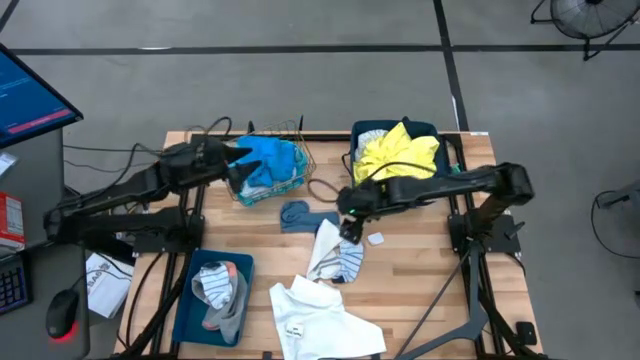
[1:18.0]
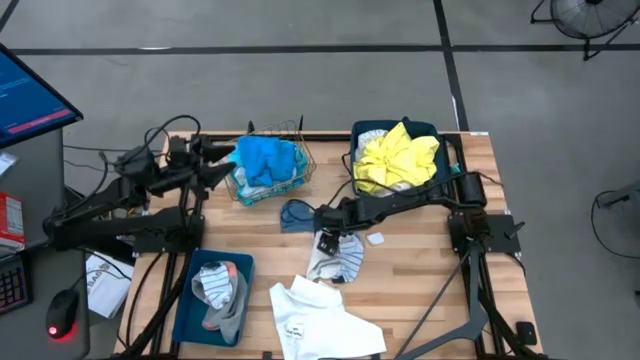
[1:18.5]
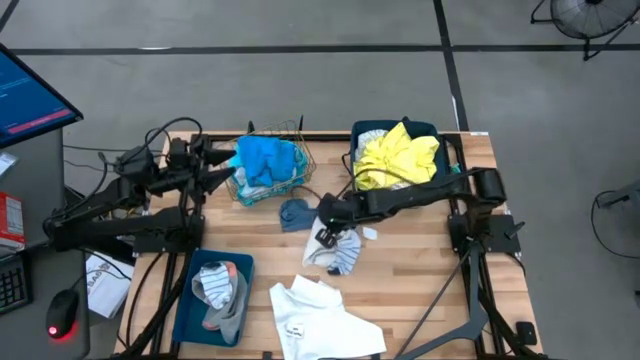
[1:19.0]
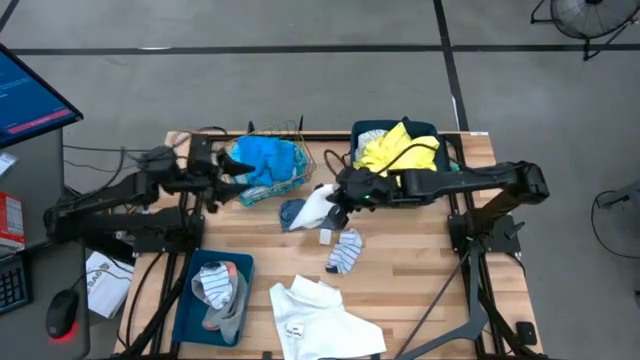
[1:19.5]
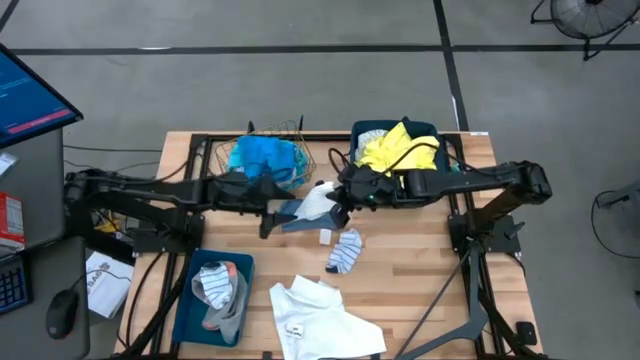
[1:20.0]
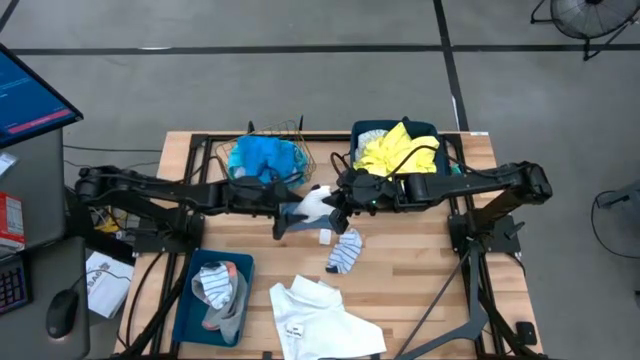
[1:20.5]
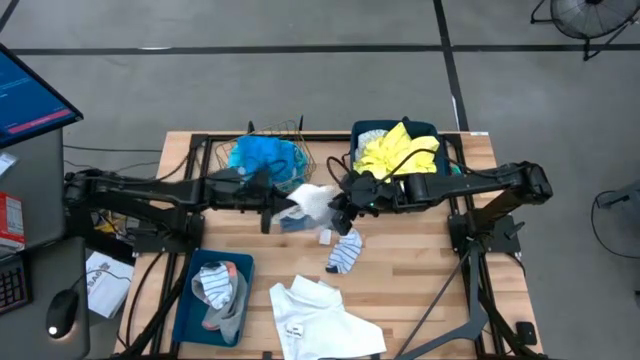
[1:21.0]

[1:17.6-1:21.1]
Task: Pick & Place Cloths
Put the white sock into the blue bin

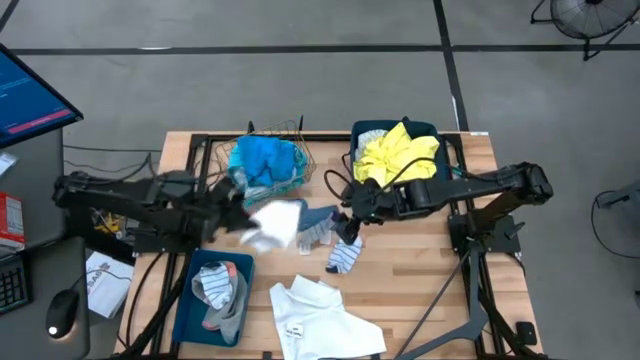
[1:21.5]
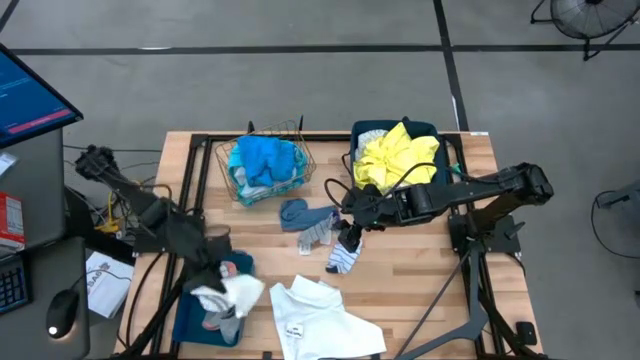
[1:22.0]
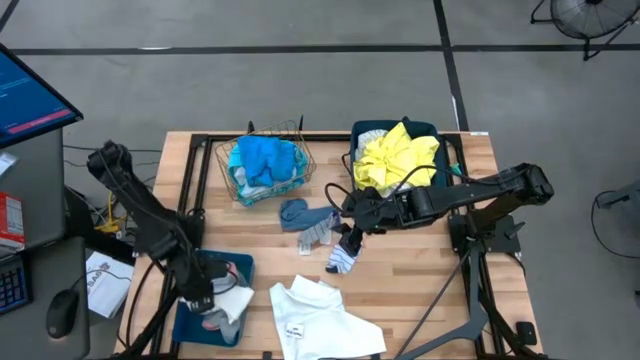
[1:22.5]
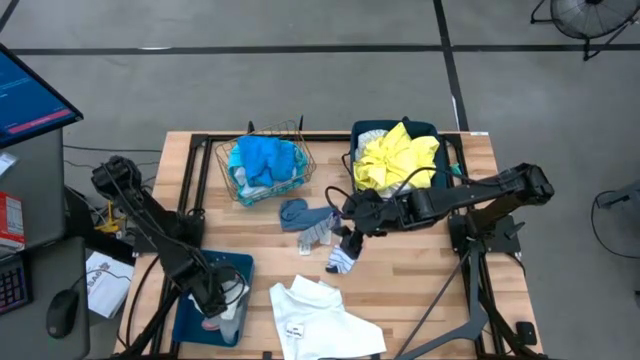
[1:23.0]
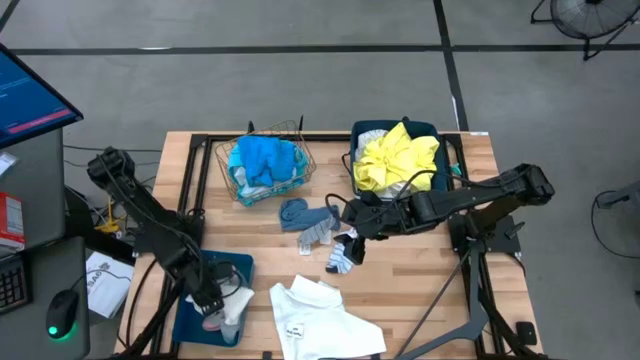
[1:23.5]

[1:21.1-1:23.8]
Put the white sock into the blue bin

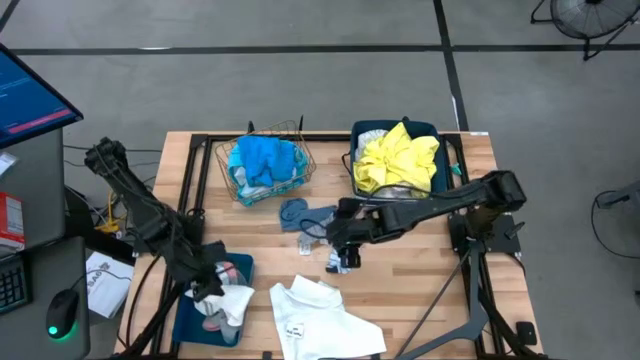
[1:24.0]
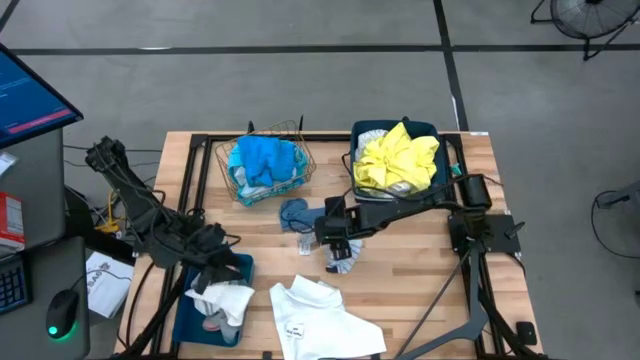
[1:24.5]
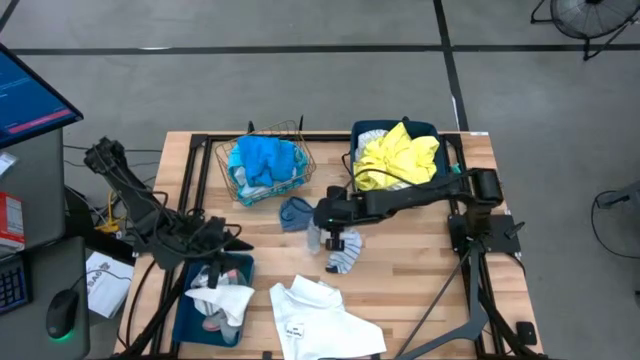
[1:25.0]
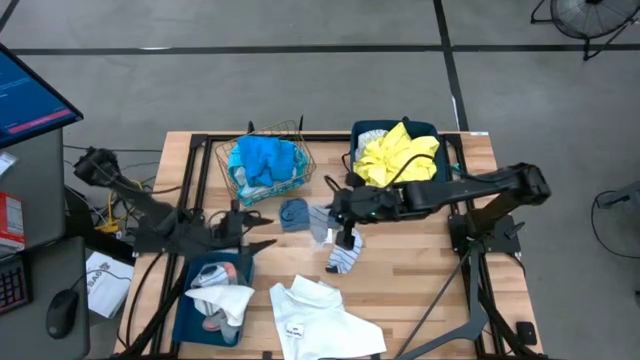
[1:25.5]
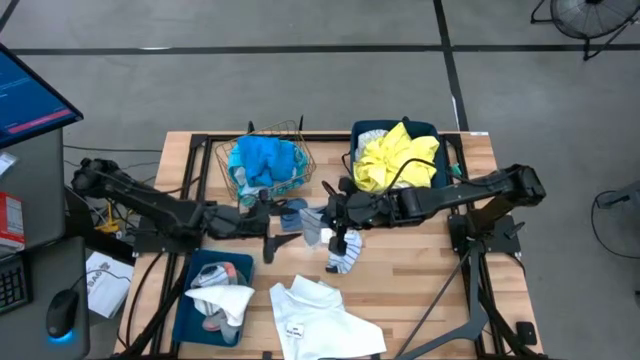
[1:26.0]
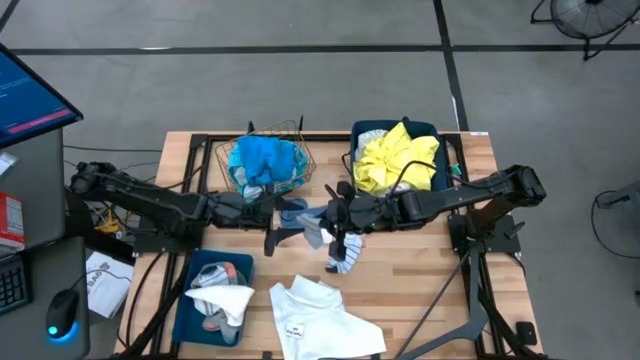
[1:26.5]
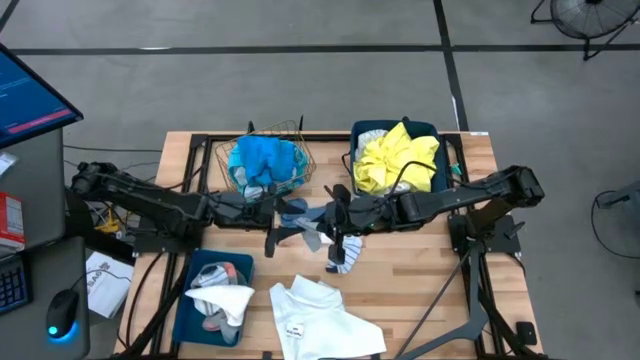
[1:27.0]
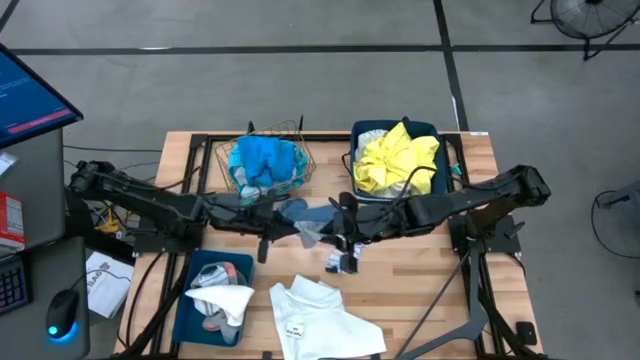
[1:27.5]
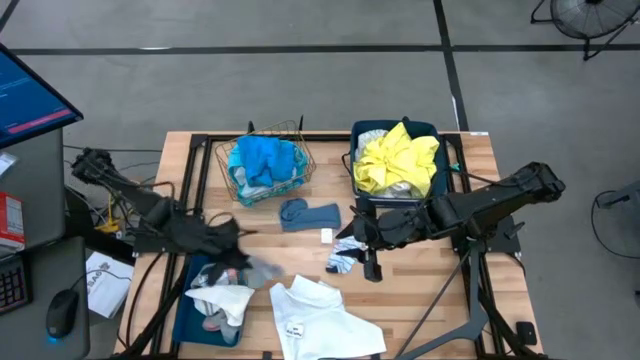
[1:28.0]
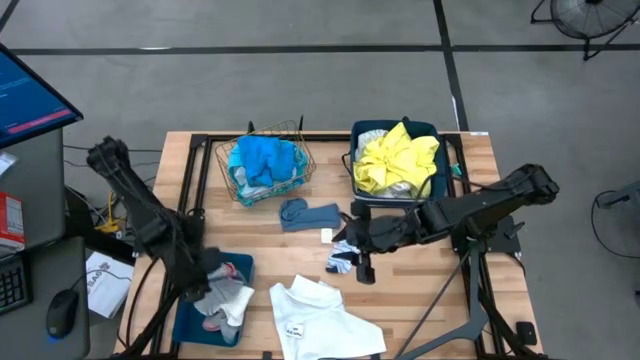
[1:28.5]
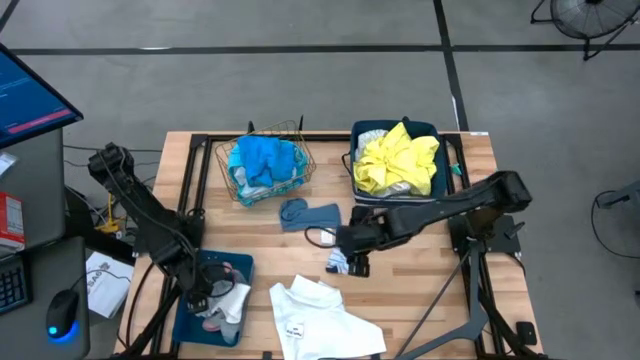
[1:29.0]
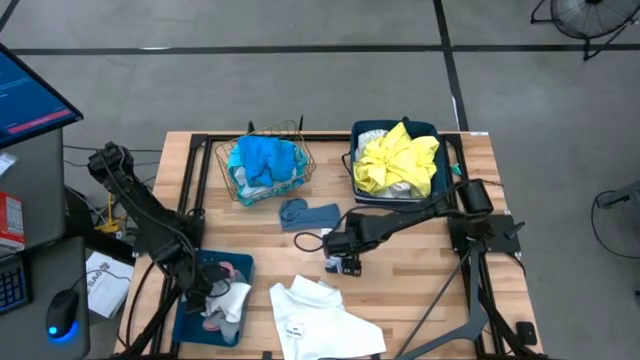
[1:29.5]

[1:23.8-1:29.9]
Put the gray striped sock into the blue bin

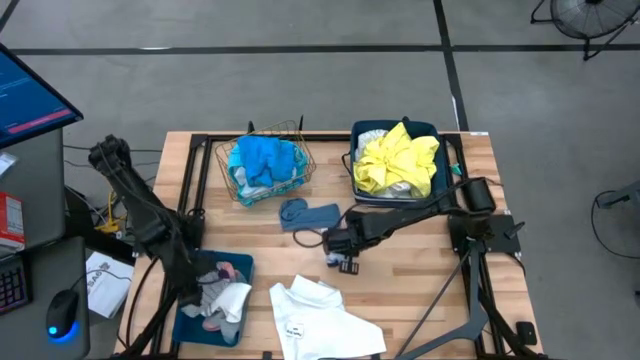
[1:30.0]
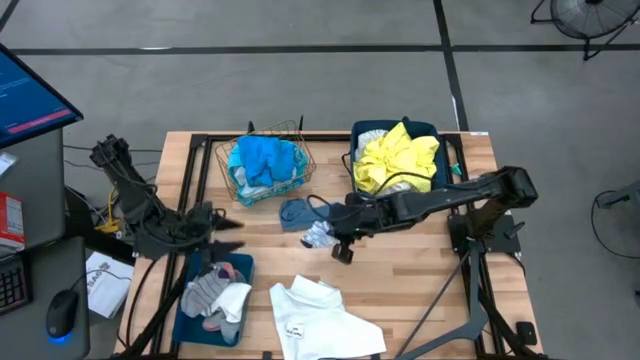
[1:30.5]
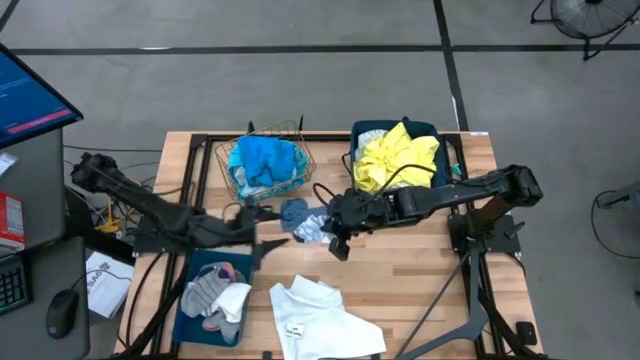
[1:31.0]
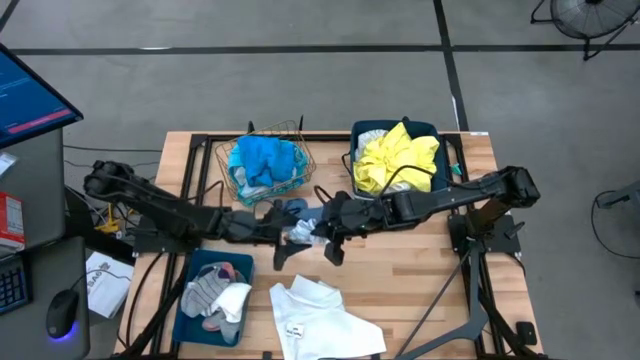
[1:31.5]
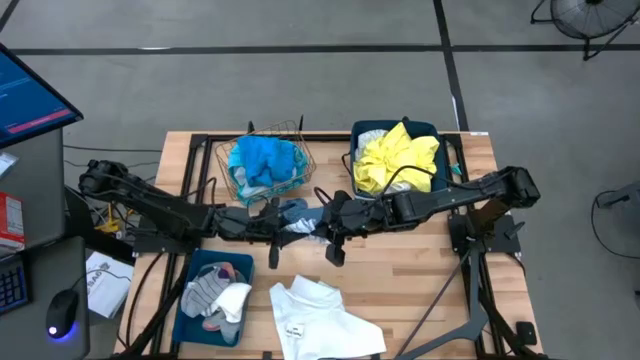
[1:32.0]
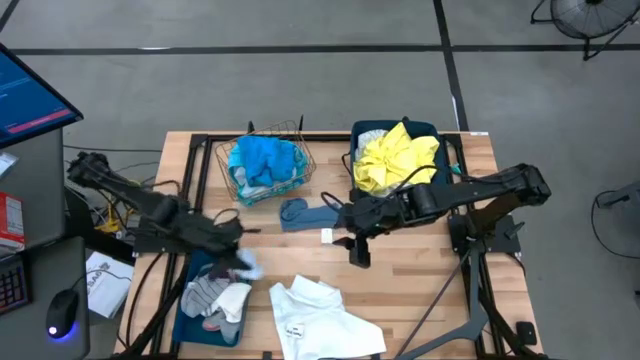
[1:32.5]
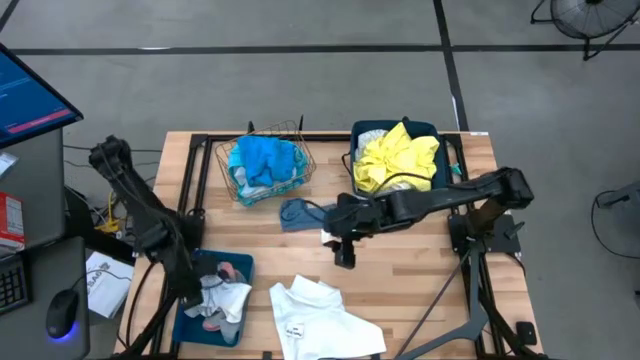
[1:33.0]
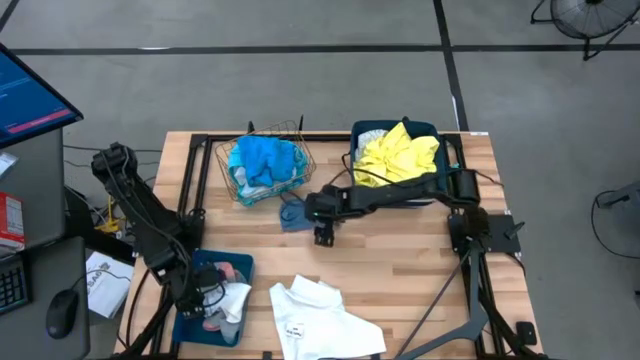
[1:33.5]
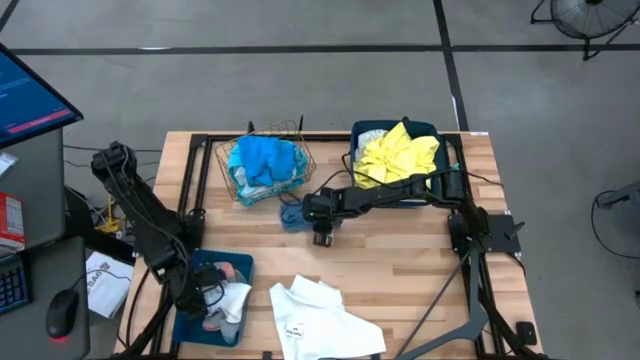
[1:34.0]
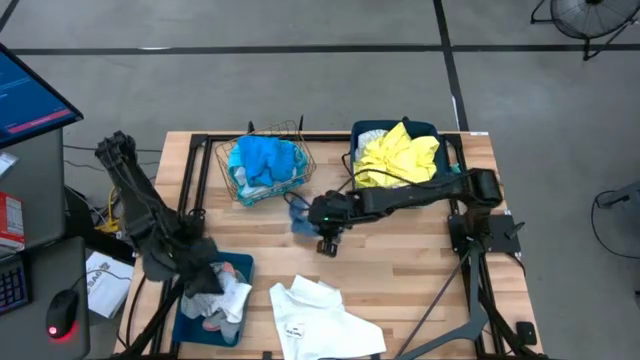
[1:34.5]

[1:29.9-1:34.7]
Put the white striped sock into the blue bin

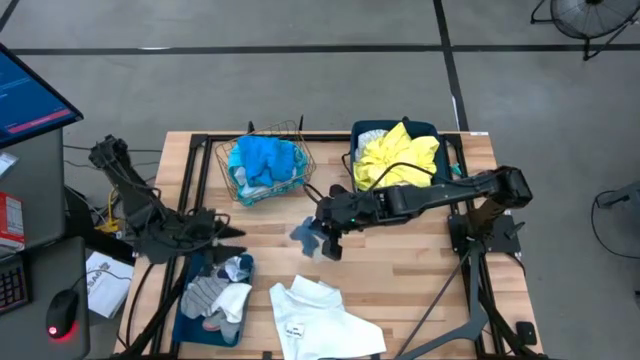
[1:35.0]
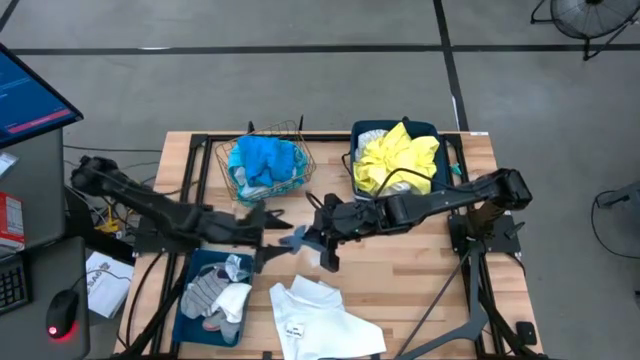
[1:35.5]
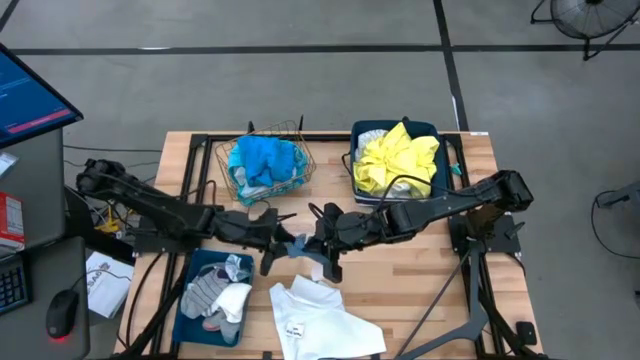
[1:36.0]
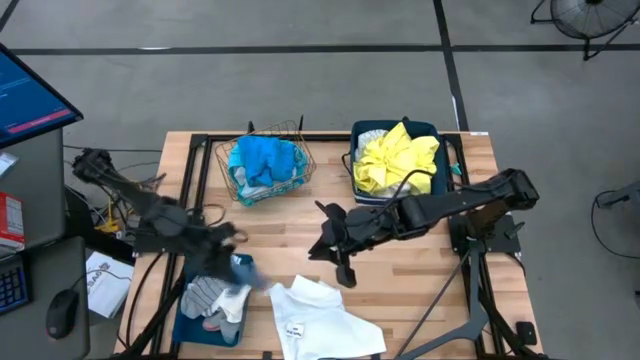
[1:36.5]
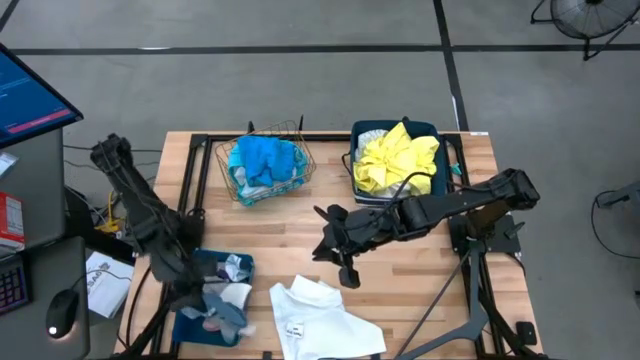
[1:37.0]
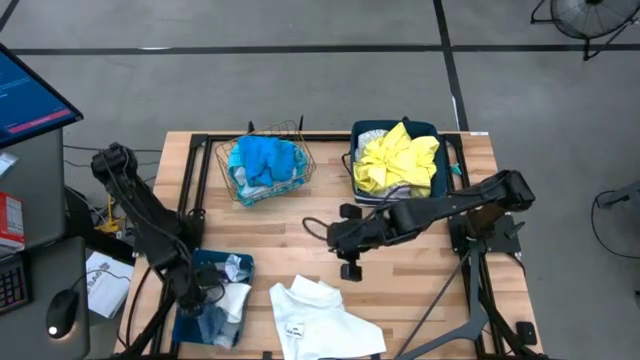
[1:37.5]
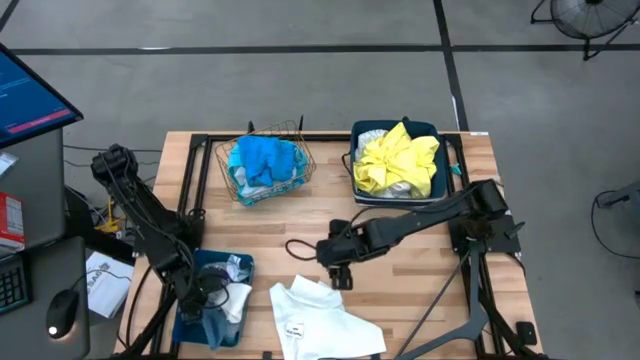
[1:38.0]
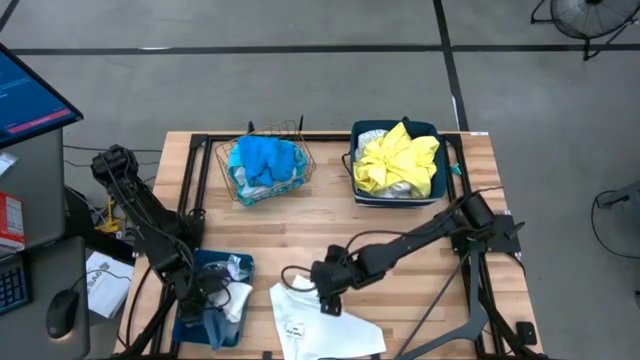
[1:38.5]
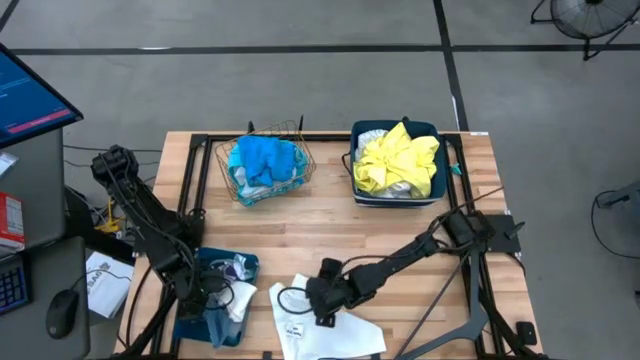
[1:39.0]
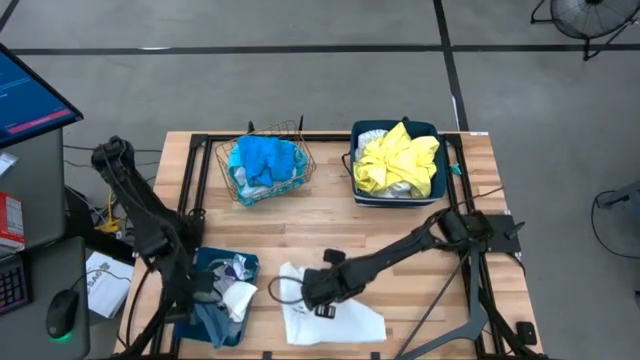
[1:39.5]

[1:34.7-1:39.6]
Put the blue sock into the blue bin
